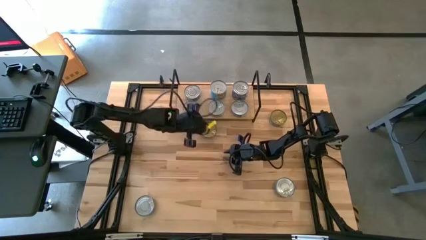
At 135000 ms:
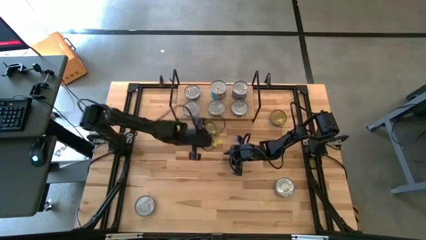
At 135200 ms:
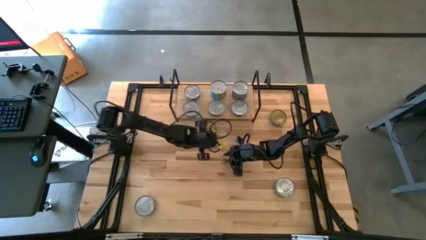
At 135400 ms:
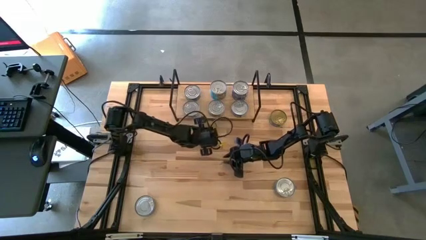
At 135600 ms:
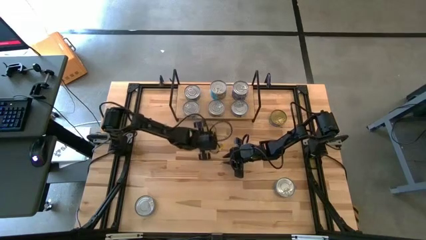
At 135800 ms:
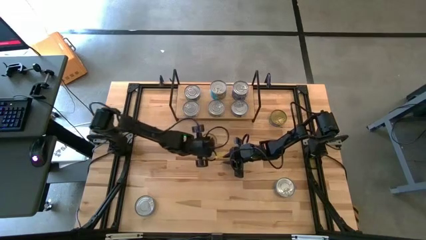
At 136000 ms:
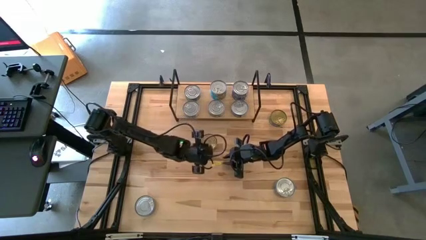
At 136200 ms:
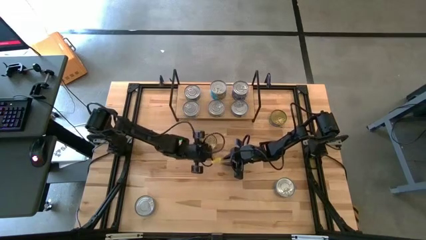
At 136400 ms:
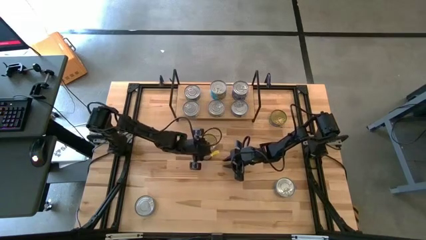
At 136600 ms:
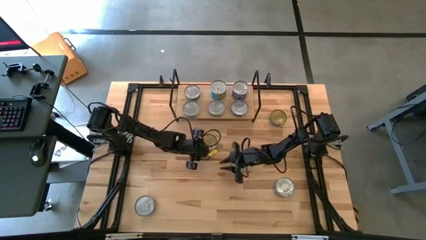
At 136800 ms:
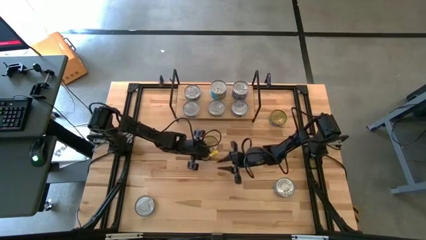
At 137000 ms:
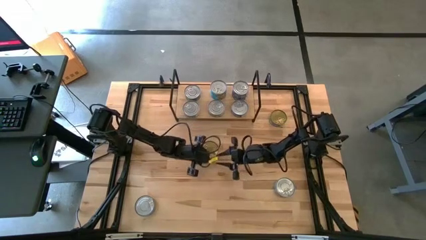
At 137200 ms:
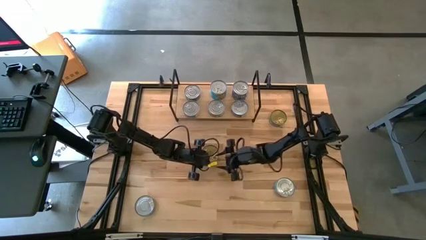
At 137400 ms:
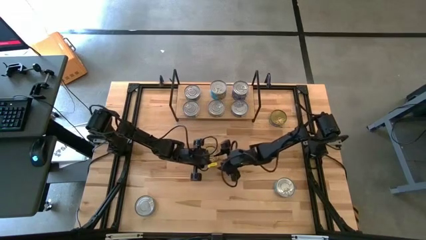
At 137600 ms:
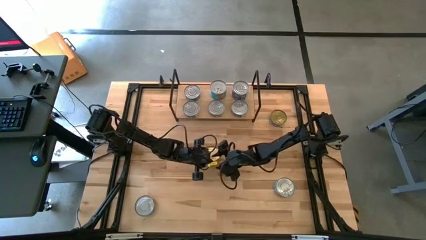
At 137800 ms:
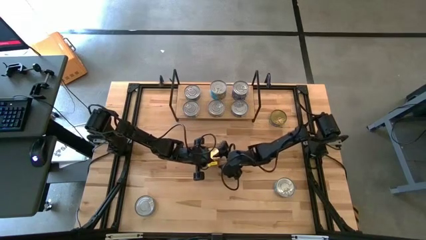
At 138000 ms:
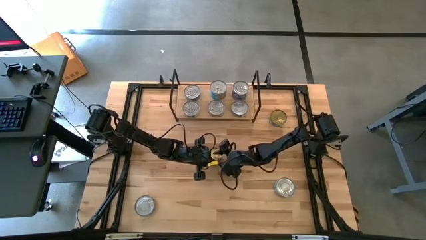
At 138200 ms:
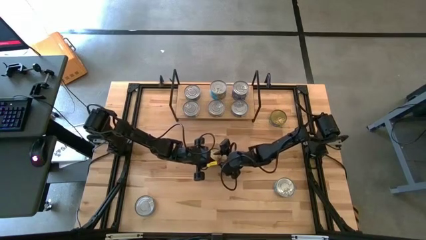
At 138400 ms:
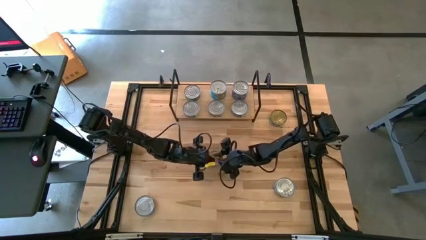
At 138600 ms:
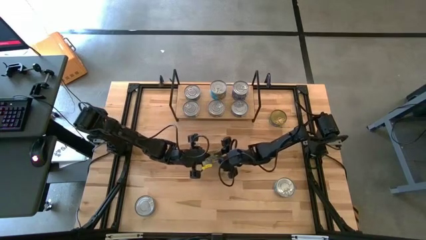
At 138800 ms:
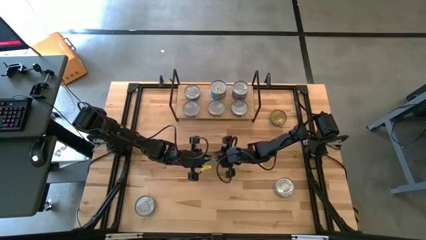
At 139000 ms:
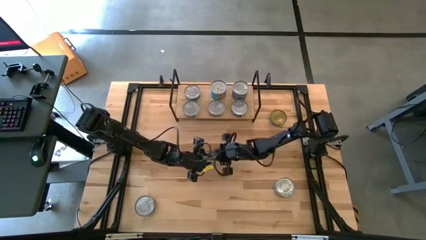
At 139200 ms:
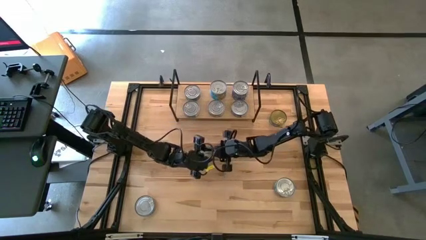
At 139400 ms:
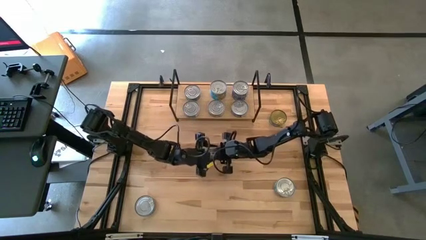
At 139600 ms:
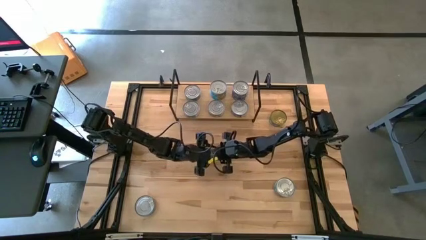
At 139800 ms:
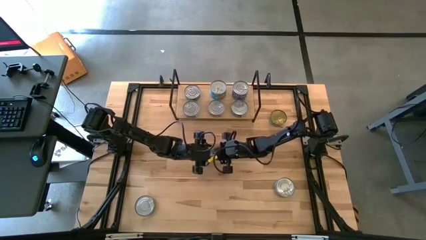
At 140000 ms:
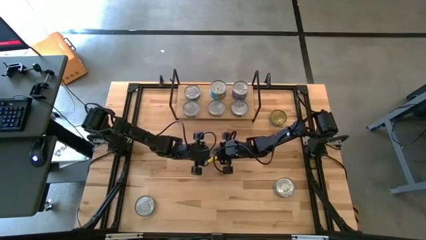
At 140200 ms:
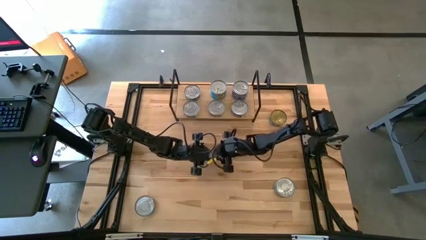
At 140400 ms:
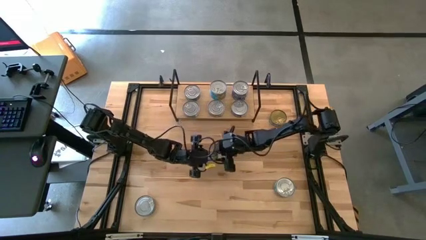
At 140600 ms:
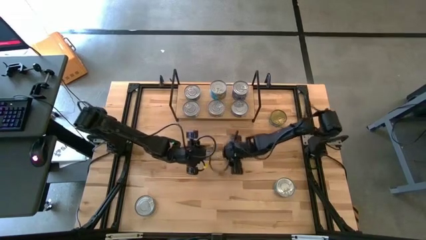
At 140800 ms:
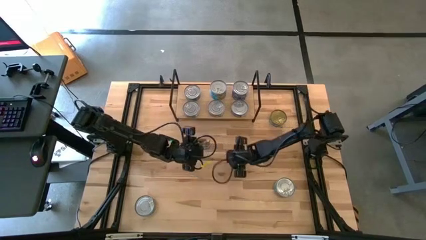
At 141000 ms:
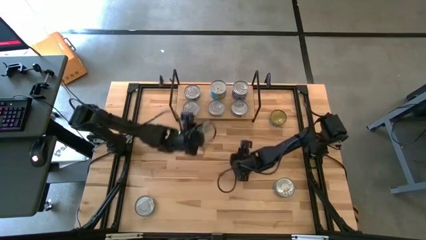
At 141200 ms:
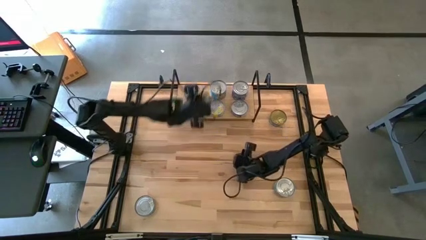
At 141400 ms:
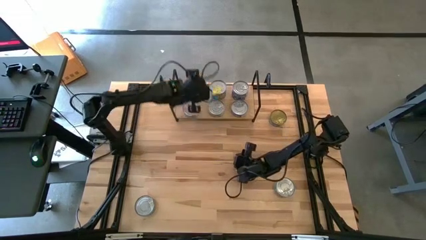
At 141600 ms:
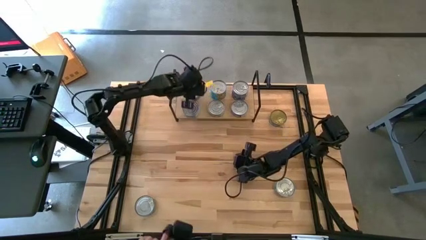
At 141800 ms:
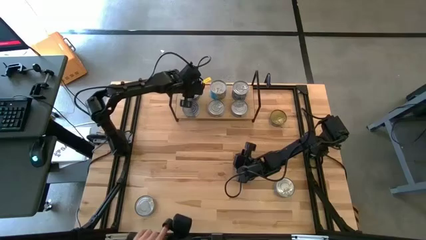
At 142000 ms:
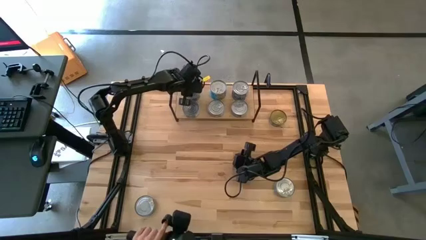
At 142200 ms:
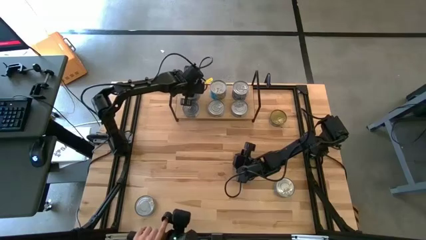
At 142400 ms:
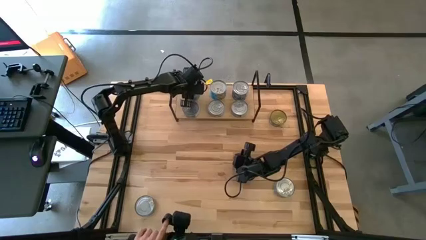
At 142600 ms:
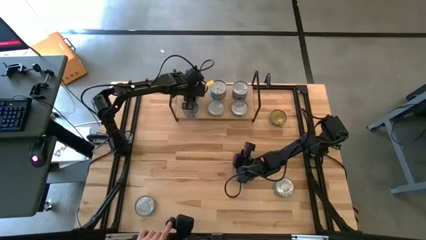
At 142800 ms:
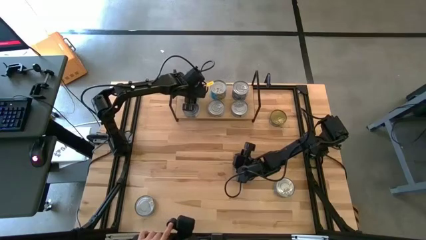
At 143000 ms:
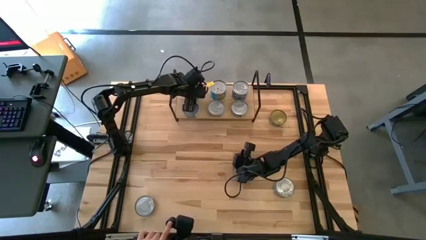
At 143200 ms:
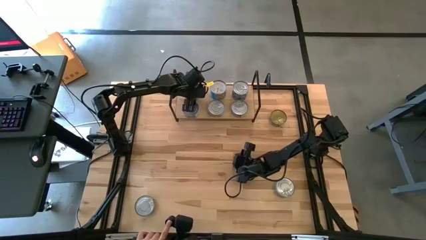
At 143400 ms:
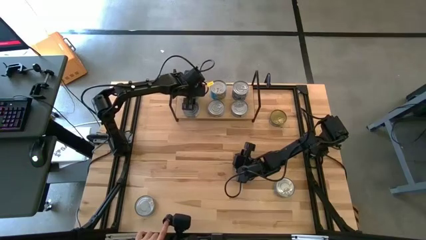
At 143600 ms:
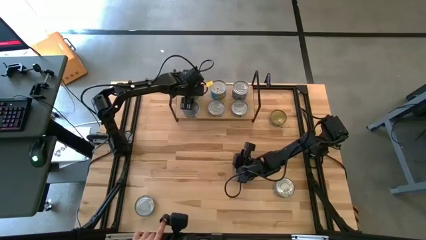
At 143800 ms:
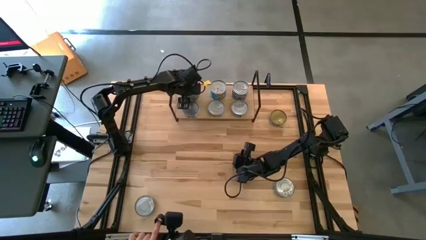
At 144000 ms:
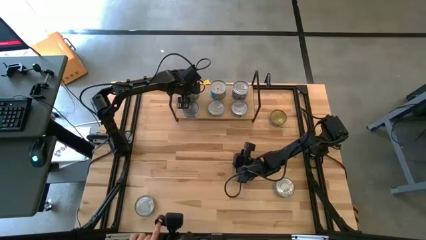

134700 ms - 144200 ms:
Task: Stack canned seafood by type on shelf
Stack the green tuna can on top of the green tuna can on the shelf

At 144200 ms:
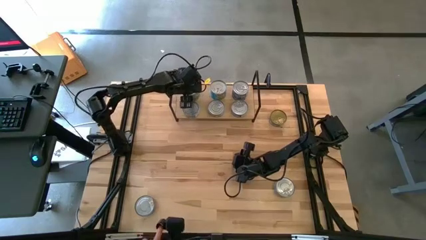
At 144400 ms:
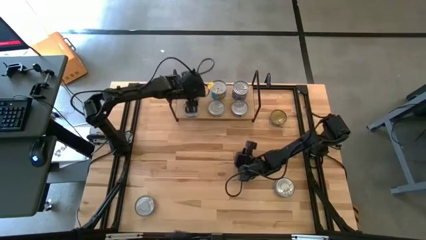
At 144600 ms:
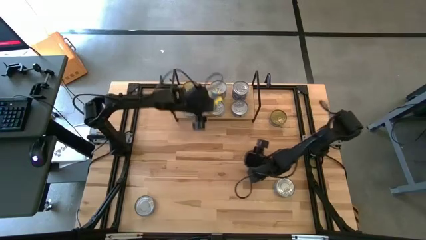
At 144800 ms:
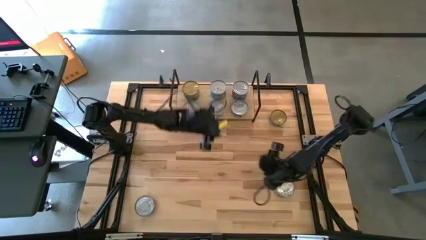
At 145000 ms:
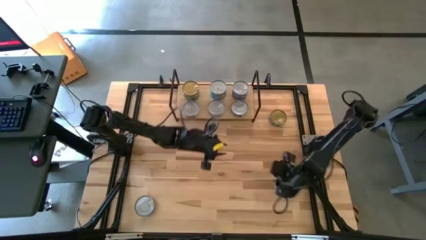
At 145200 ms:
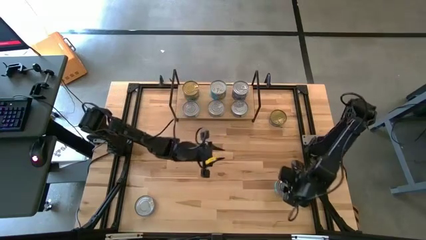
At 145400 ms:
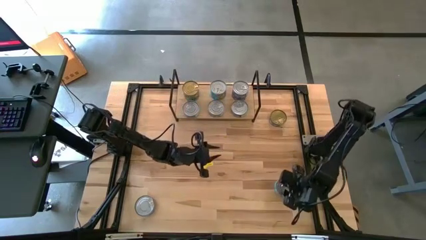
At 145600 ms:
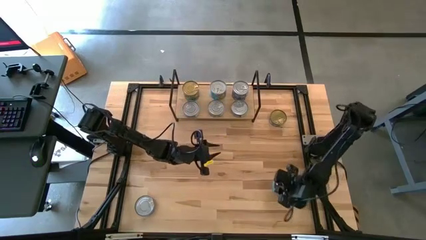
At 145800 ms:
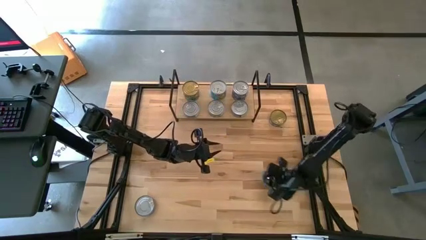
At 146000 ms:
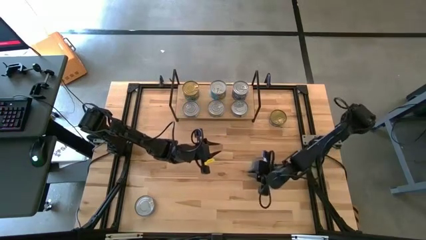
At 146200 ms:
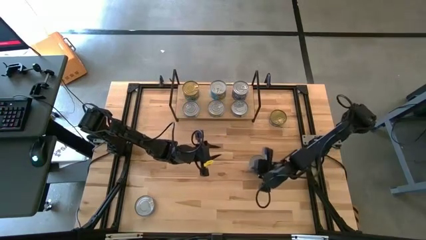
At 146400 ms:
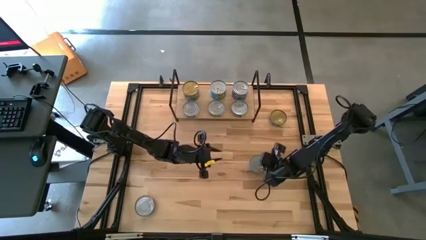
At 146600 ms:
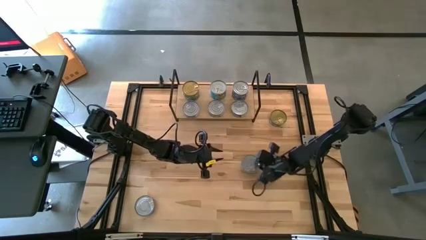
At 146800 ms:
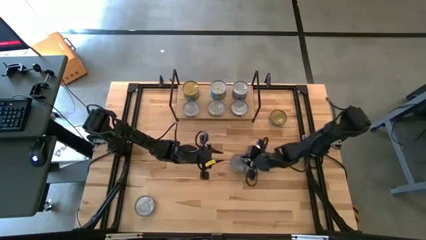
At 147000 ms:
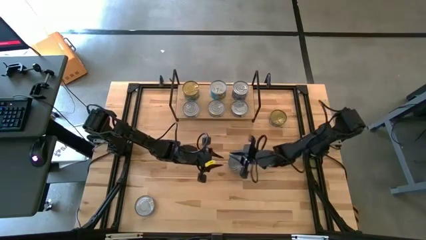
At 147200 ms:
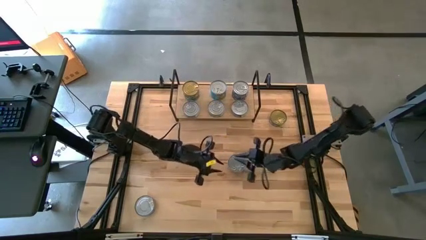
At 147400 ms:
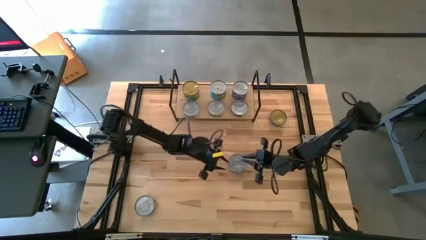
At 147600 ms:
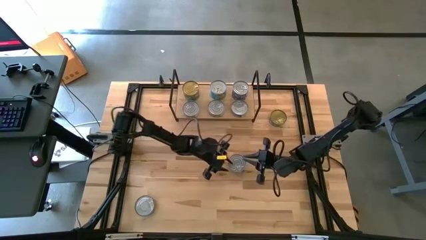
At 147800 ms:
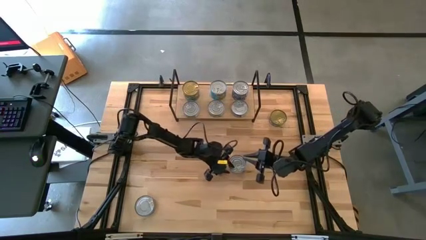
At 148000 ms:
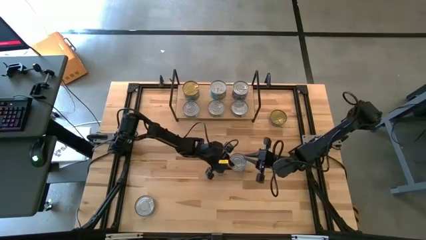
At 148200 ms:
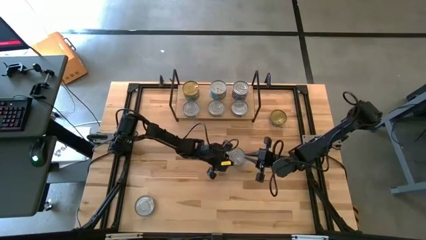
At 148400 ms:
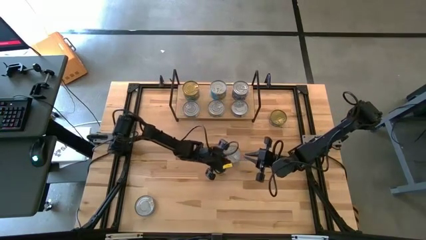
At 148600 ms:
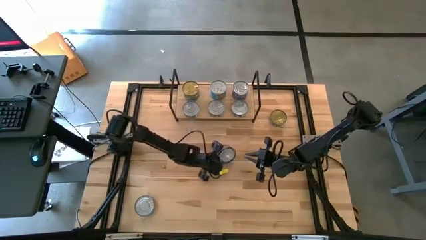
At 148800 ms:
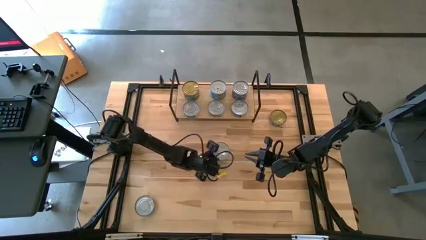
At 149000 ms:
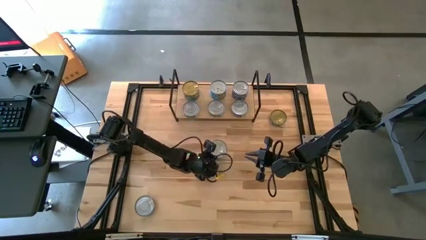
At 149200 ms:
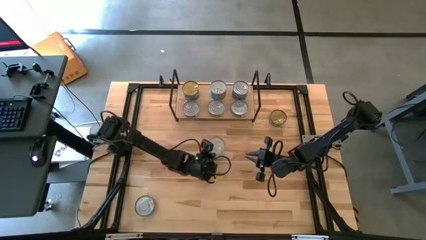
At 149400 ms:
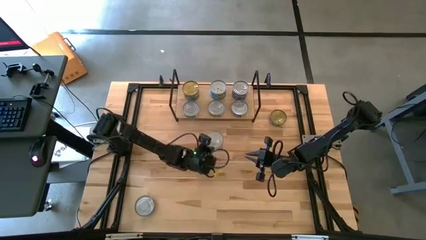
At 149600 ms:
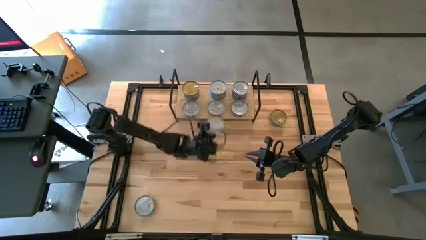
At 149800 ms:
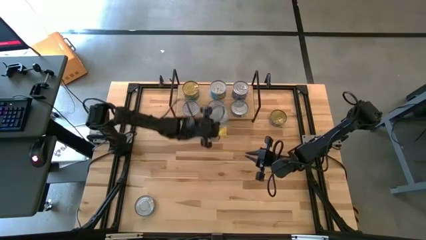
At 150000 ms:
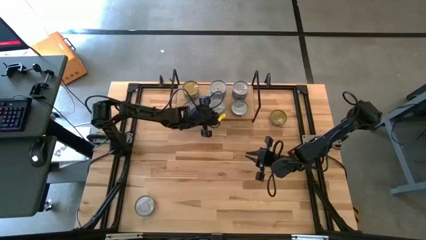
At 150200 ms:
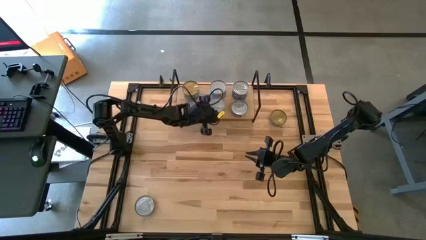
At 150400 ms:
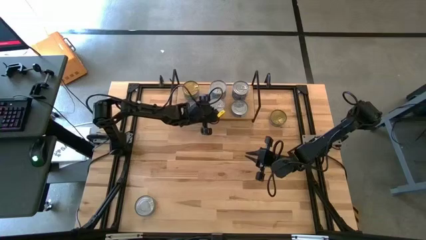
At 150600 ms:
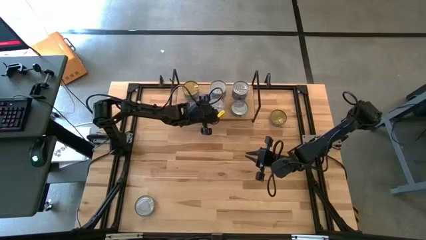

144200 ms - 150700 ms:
Stack the light blue tuna can on top of the light blue tuna can on the shelf
